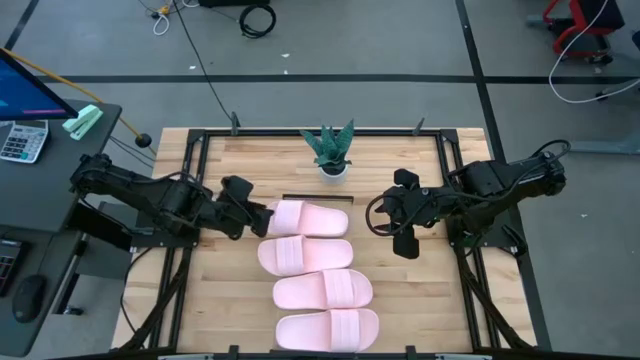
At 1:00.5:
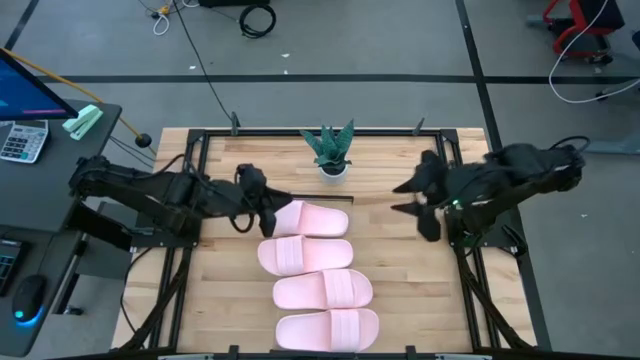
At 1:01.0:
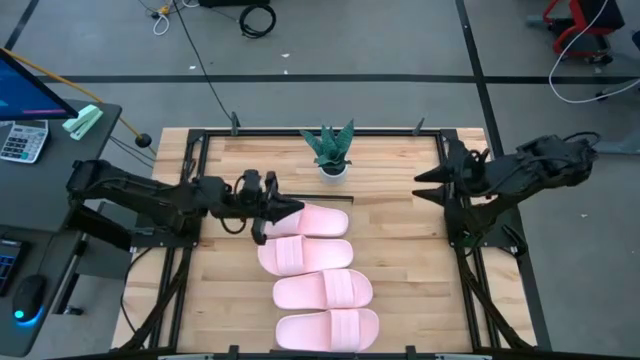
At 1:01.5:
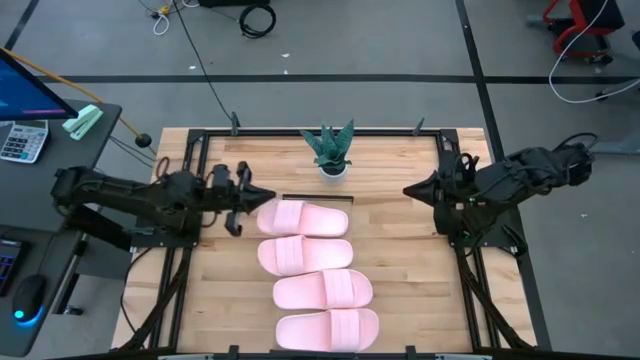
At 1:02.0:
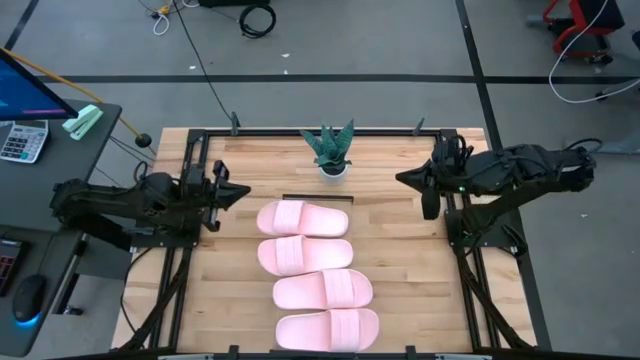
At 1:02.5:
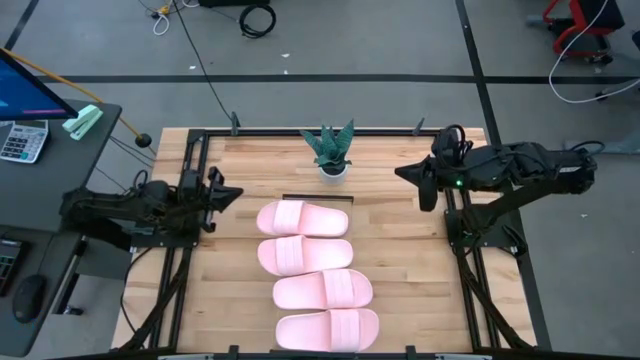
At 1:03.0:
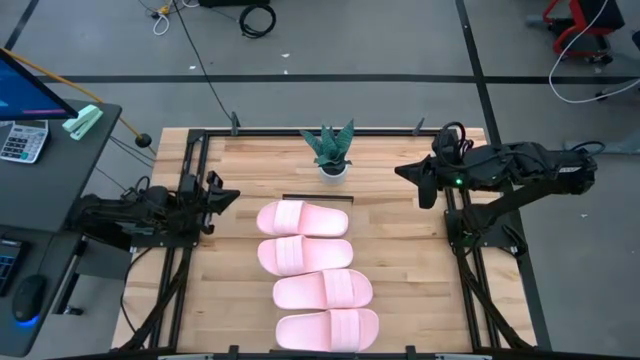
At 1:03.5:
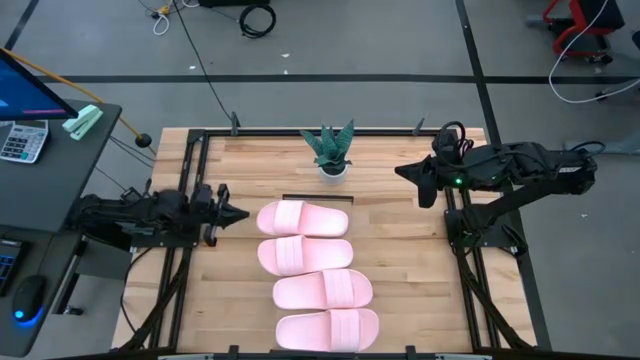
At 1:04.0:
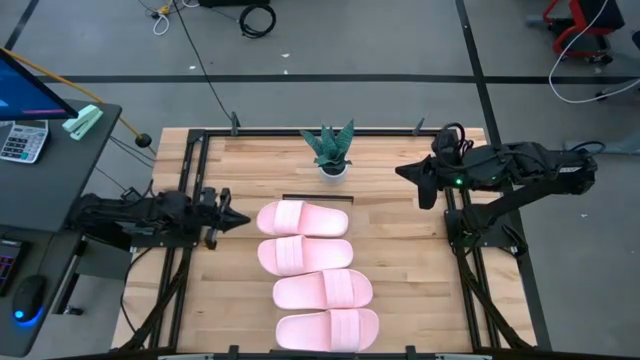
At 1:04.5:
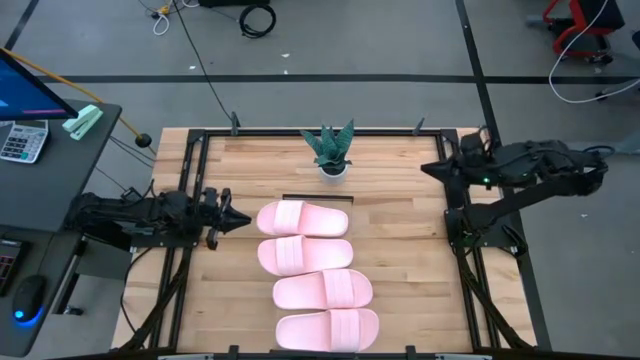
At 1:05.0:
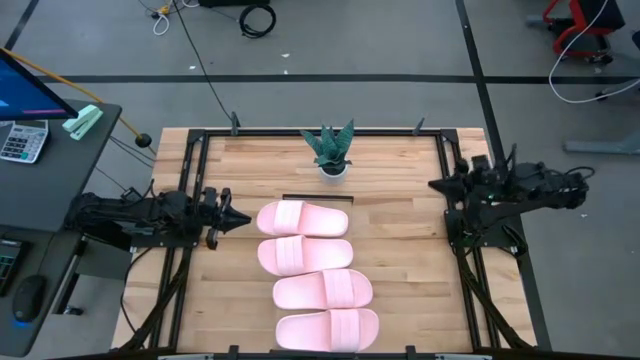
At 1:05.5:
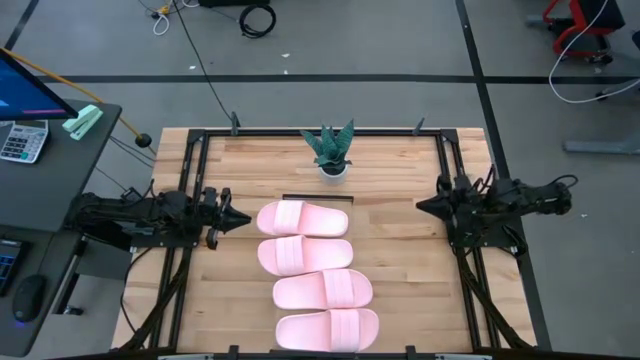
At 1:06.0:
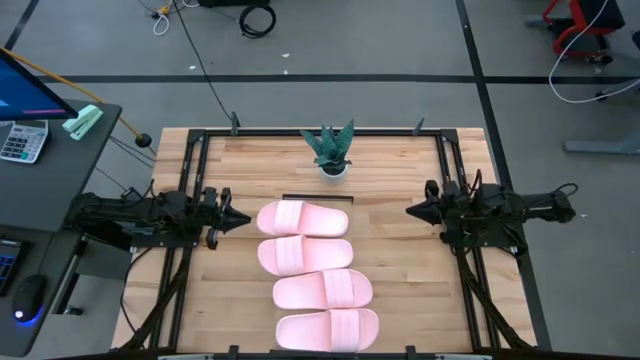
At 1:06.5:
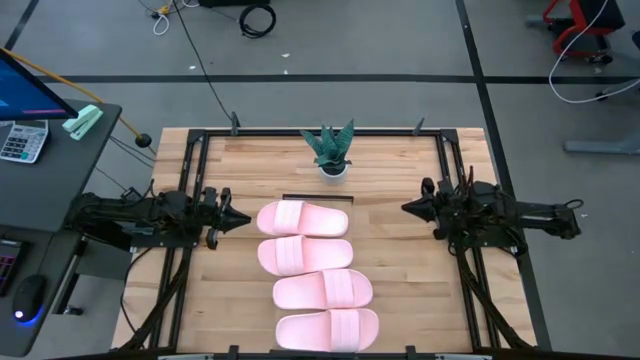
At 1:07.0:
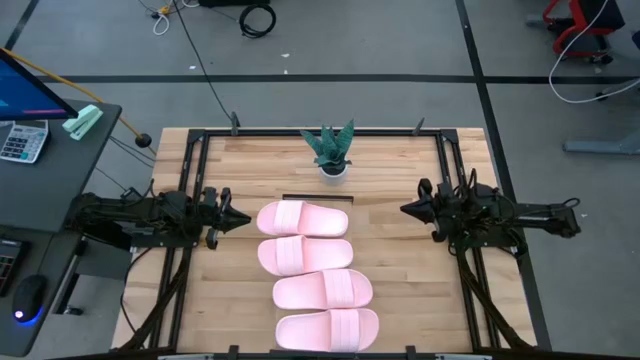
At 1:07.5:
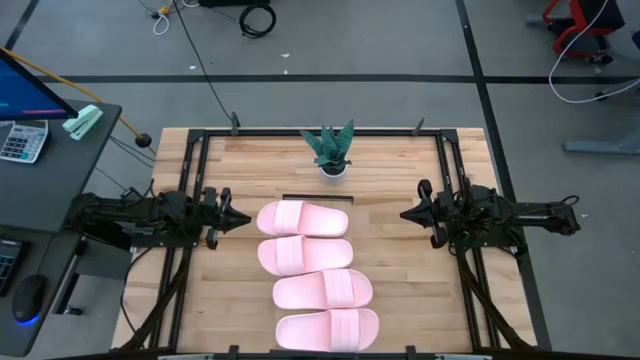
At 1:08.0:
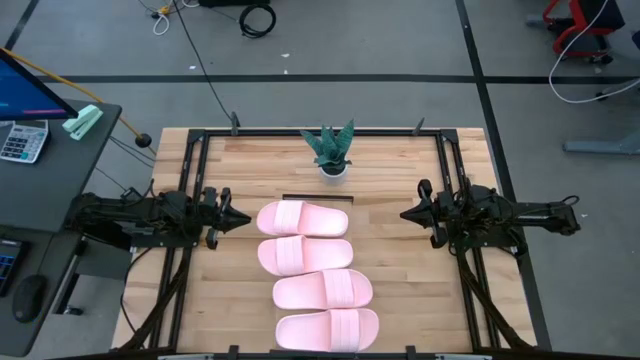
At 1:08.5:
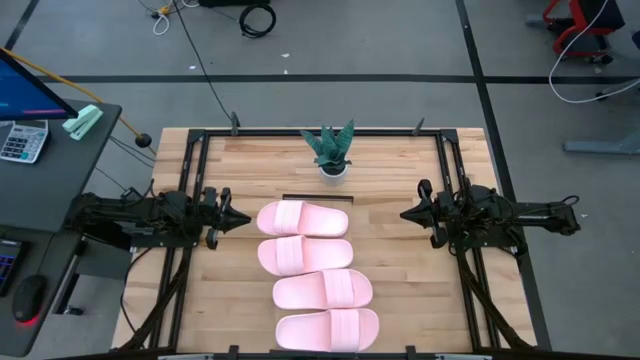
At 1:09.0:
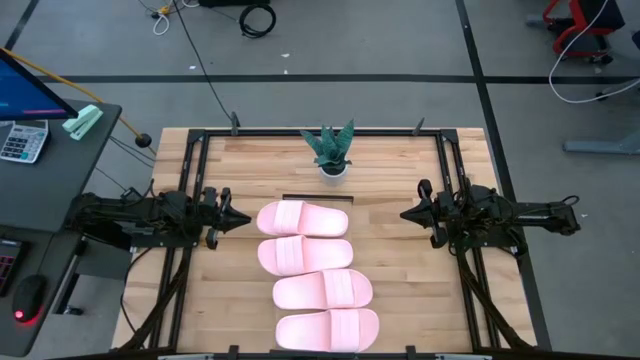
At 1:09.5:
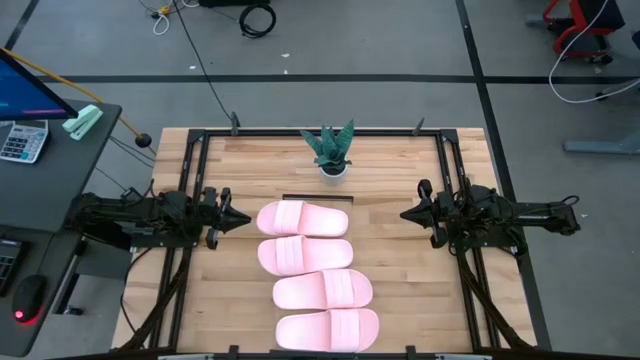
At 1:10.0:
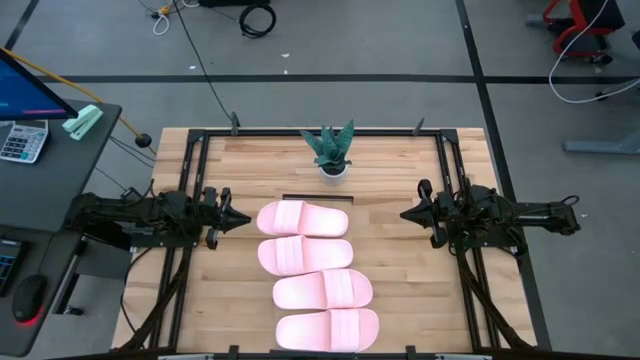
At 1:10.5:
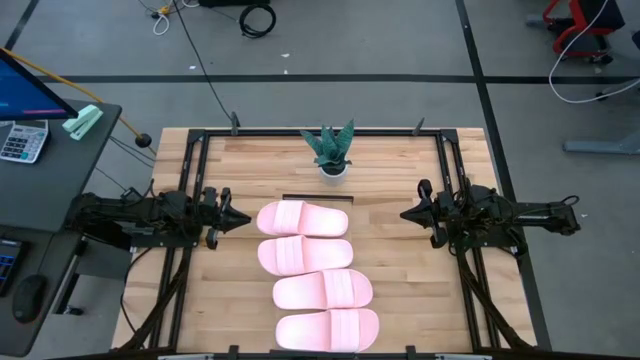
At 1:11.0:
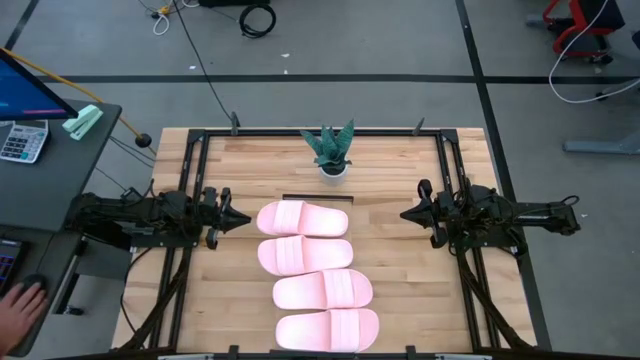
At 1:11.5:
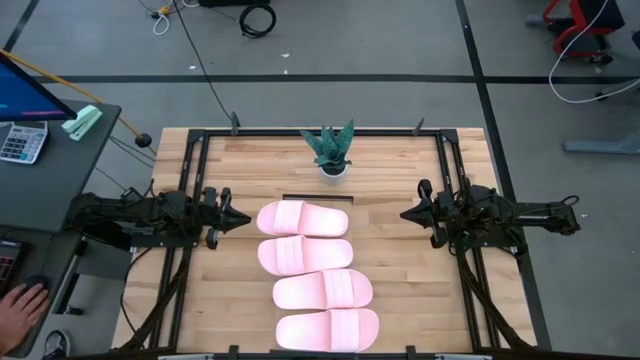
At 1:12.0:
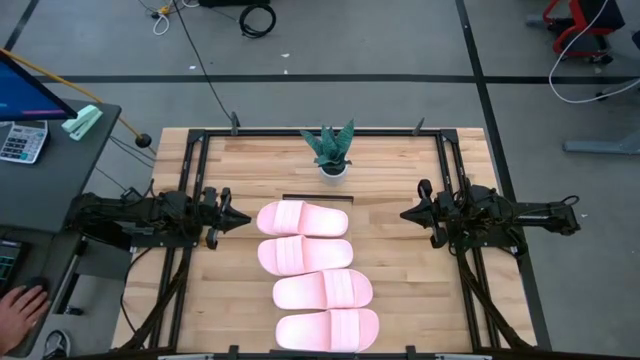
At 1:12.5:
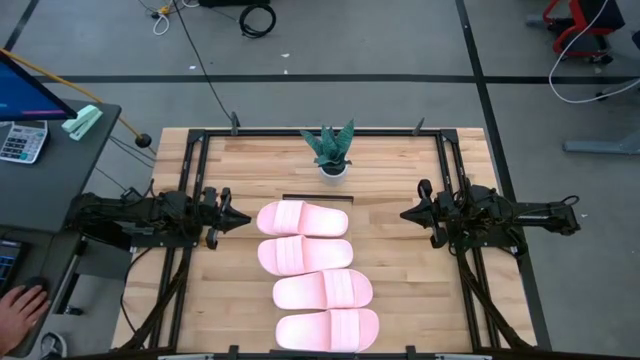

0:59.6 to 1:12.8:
Task: Pick and place slides into the shelf
Return to Home Position

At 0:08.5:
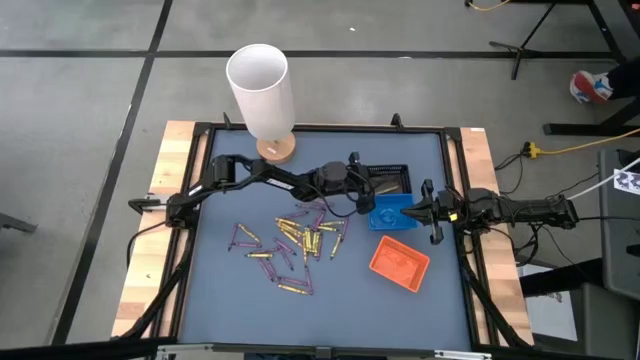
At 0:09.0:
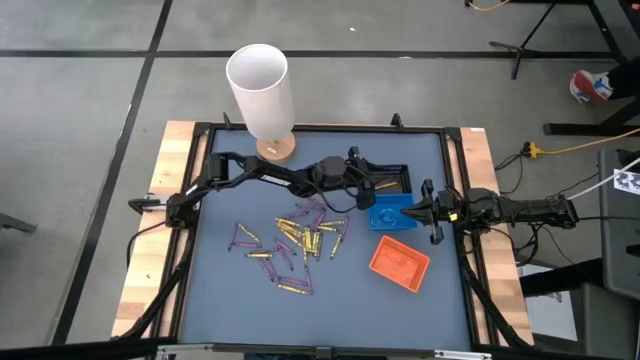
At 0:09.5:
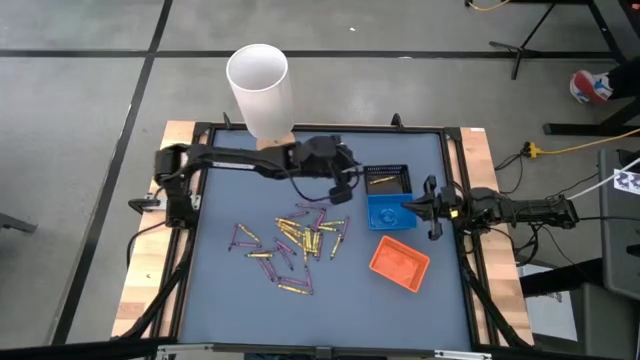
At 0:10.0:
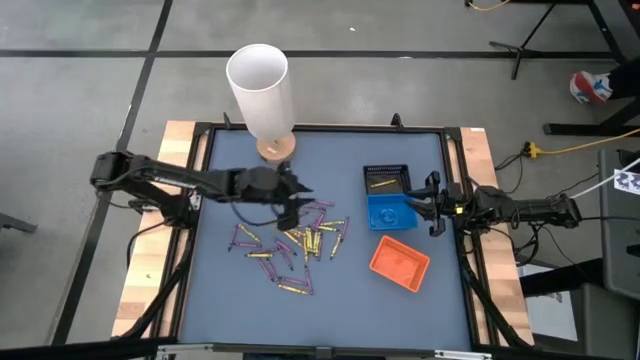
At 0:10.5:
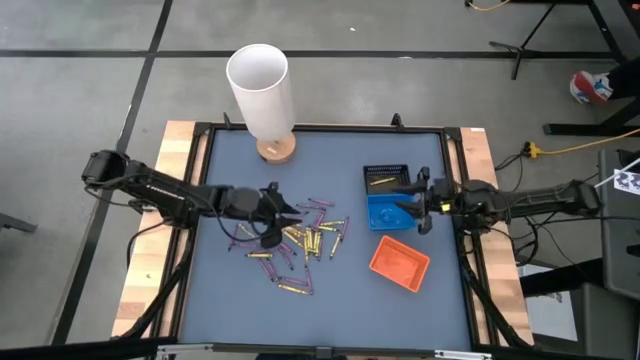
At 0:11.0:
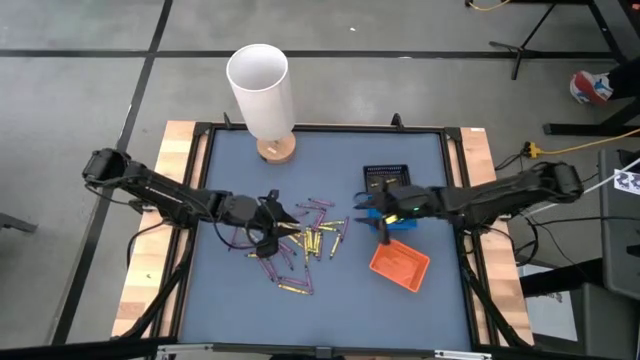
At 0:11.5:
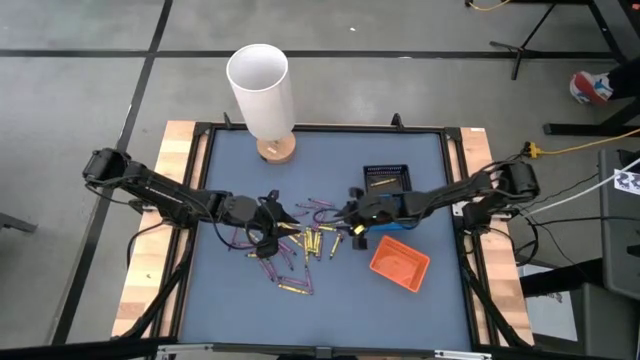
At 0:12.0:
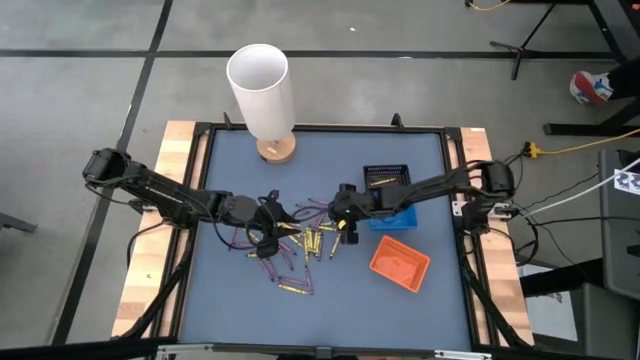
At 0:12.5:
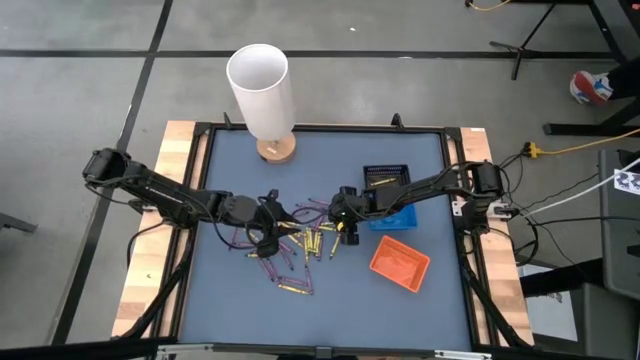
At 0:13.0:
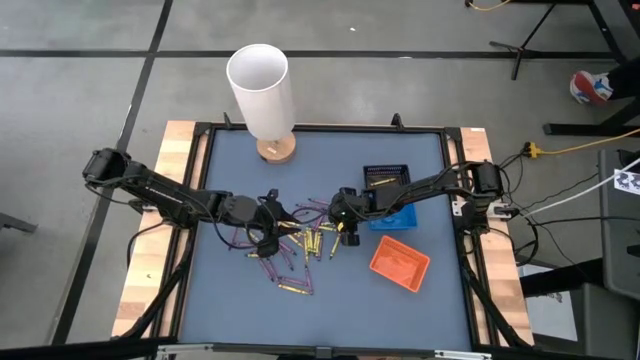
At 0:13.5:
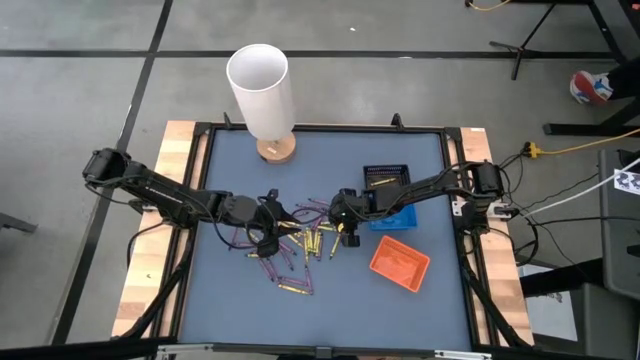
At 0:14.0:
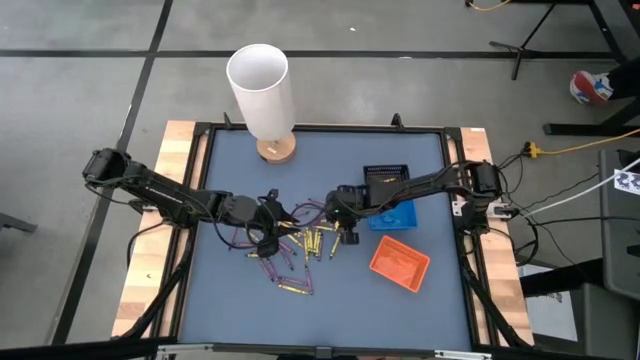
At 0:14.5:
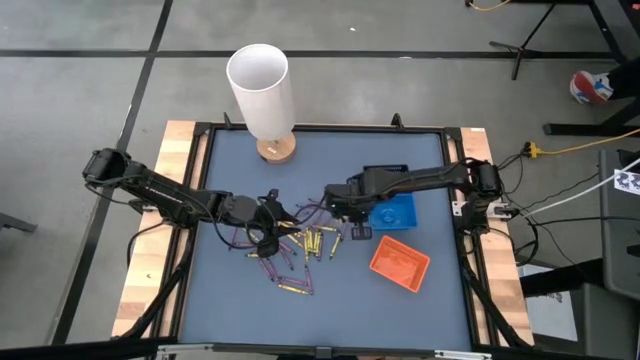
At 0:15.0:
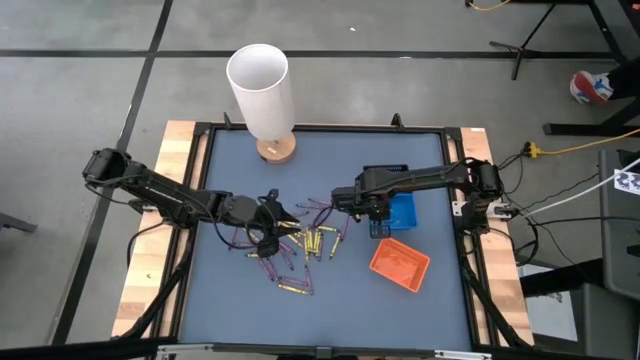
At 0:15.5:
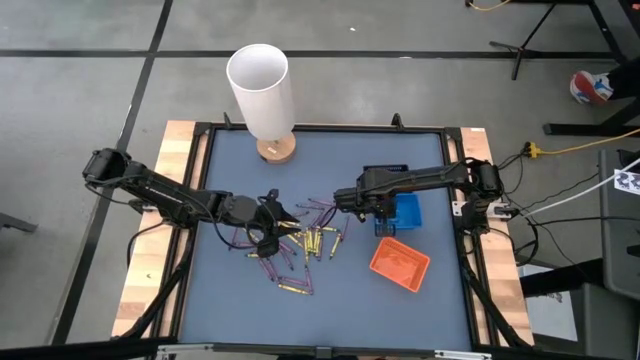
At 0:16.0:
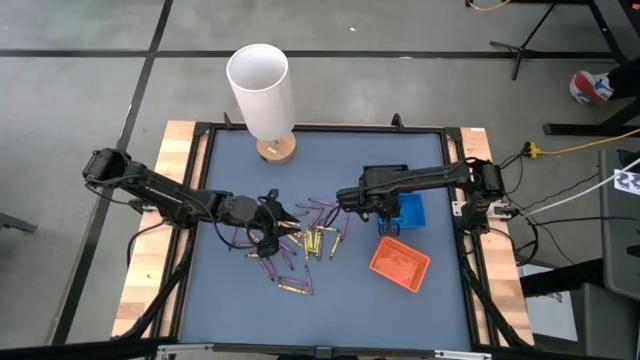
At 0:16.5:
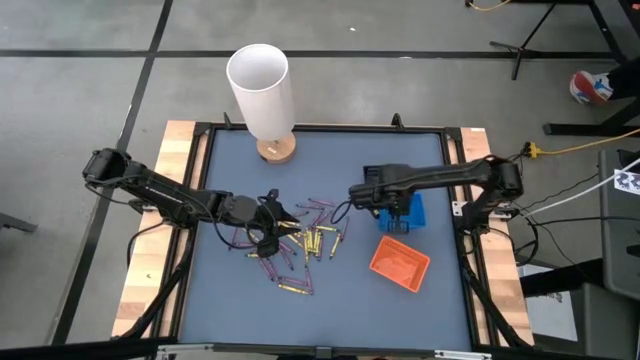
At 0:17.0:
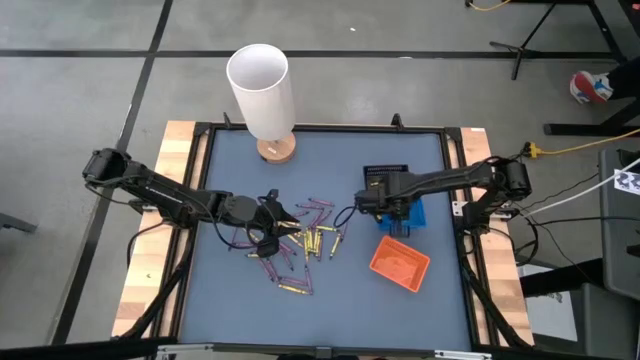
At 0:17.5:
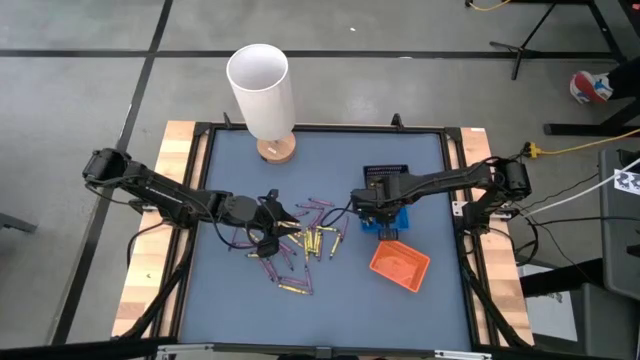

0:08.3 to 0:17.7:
Task: Sort crayons
Put the green crayon into the blue bin
